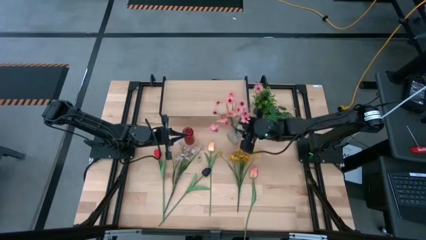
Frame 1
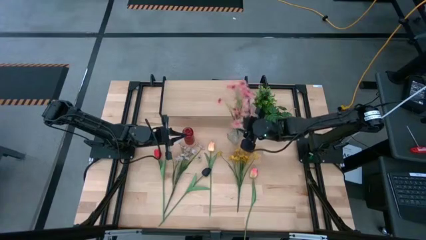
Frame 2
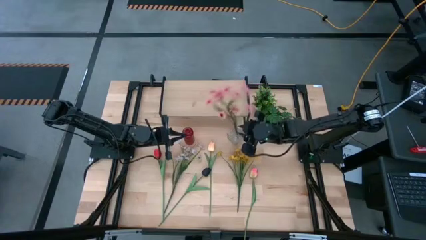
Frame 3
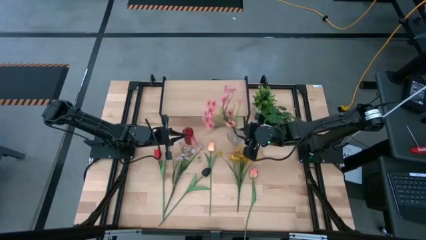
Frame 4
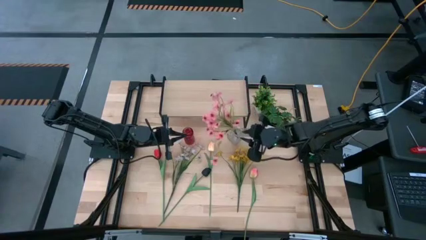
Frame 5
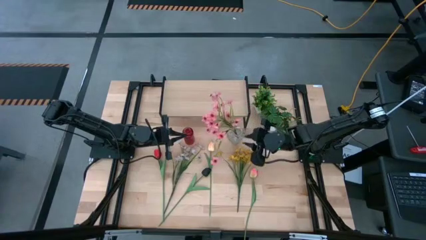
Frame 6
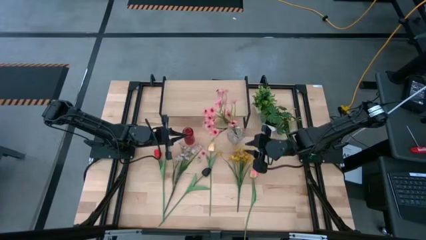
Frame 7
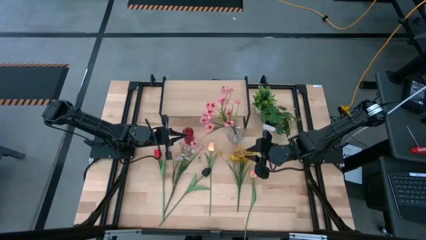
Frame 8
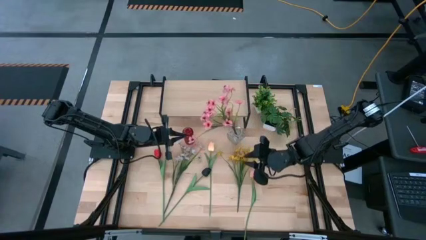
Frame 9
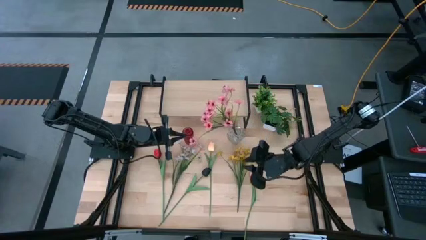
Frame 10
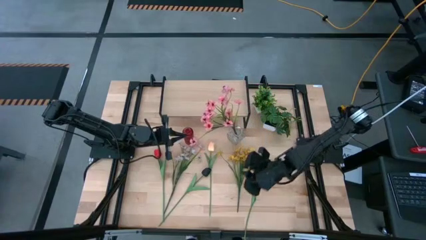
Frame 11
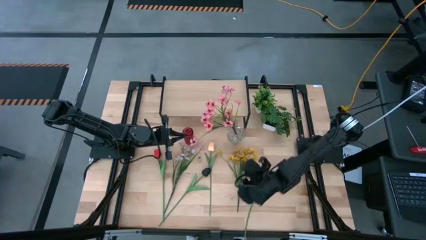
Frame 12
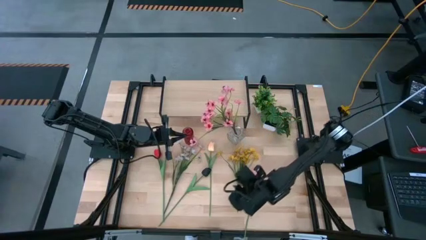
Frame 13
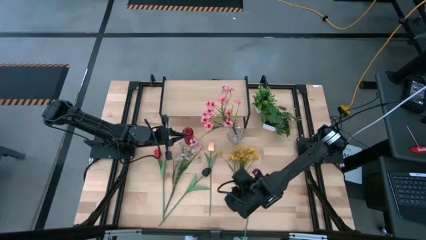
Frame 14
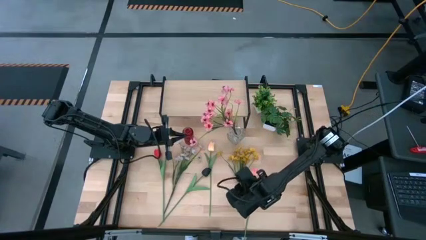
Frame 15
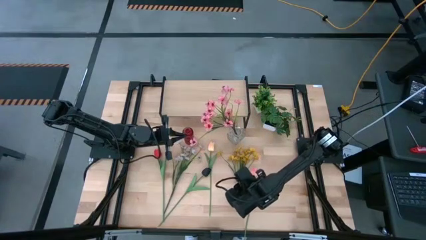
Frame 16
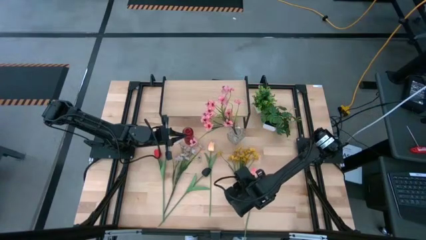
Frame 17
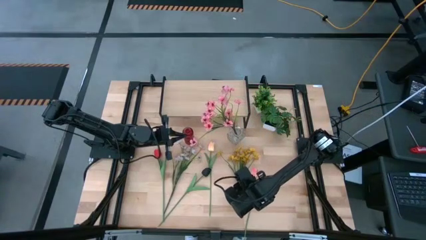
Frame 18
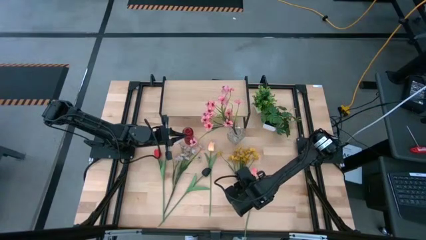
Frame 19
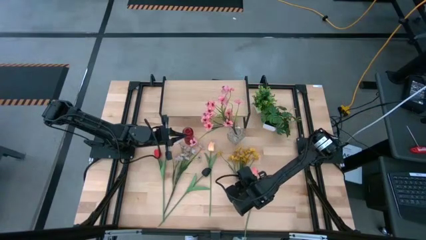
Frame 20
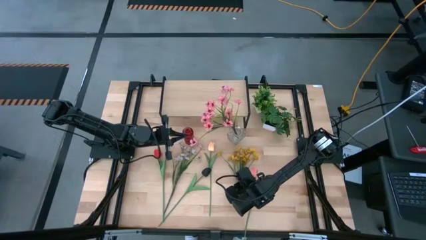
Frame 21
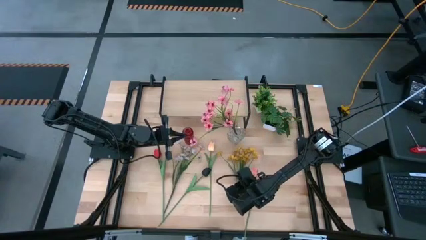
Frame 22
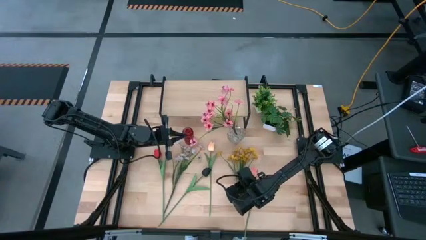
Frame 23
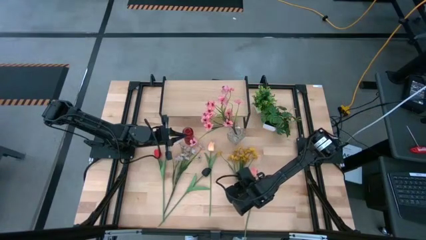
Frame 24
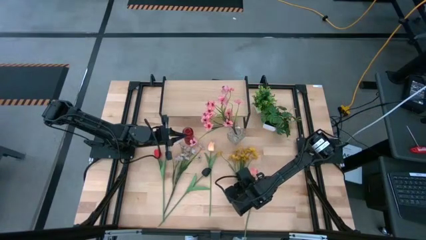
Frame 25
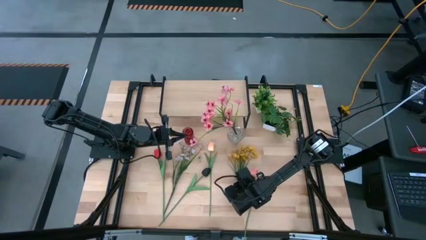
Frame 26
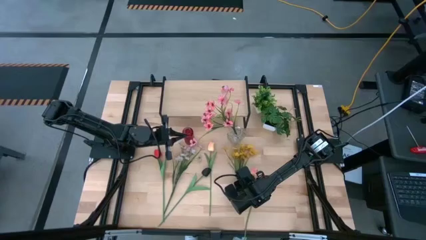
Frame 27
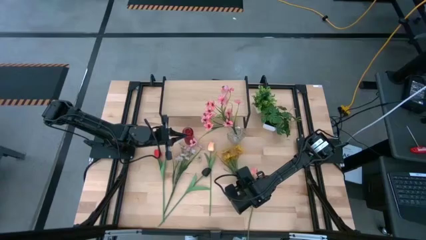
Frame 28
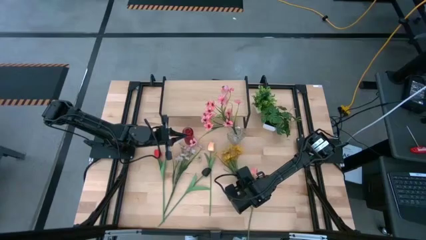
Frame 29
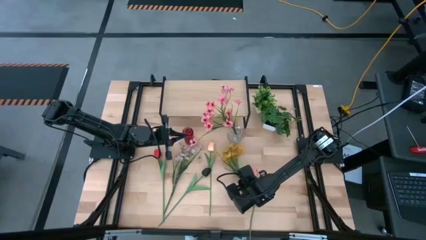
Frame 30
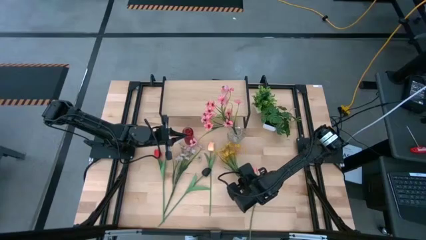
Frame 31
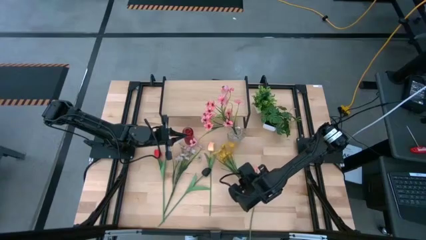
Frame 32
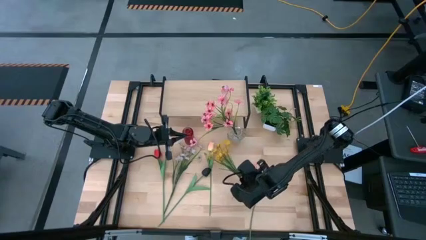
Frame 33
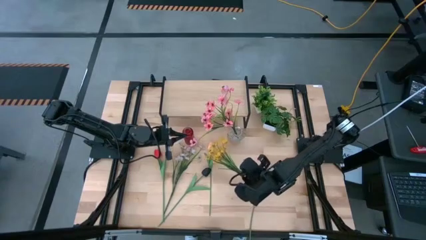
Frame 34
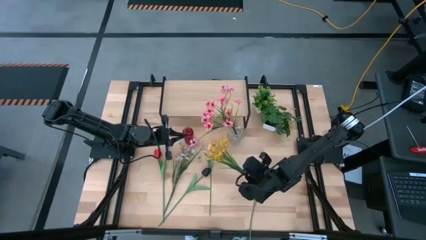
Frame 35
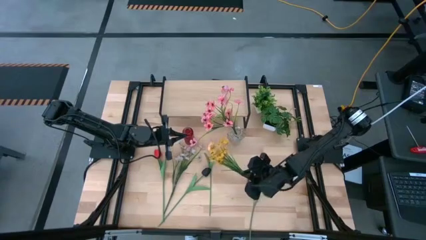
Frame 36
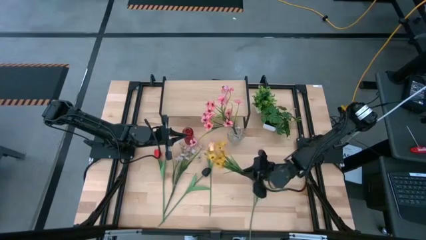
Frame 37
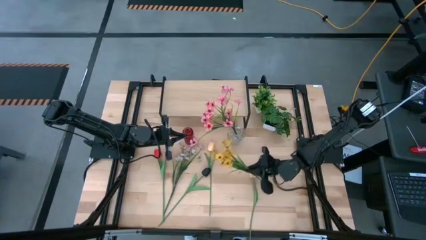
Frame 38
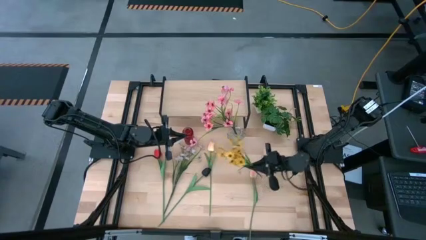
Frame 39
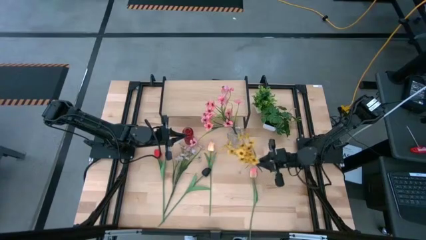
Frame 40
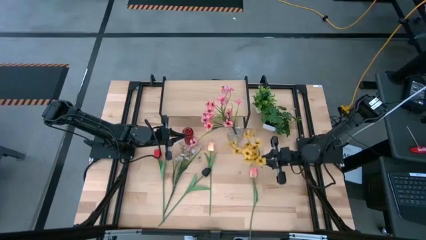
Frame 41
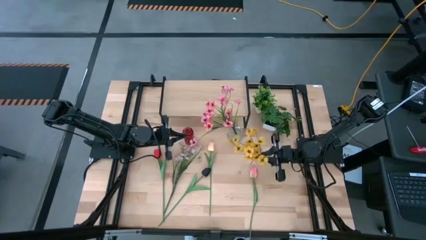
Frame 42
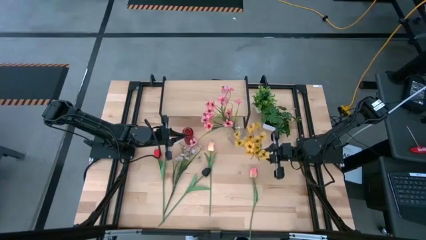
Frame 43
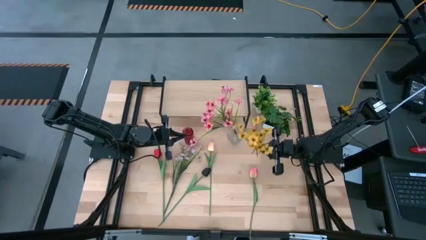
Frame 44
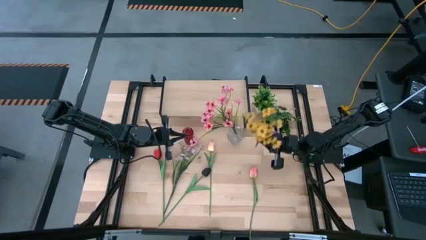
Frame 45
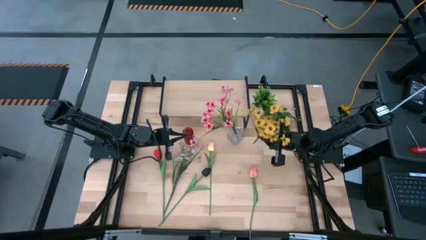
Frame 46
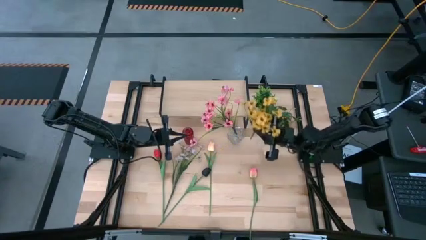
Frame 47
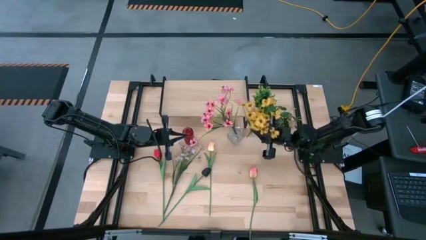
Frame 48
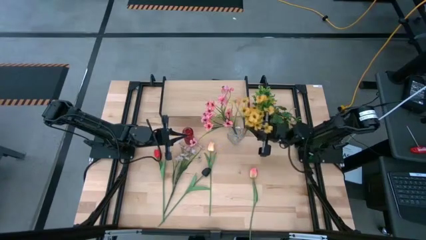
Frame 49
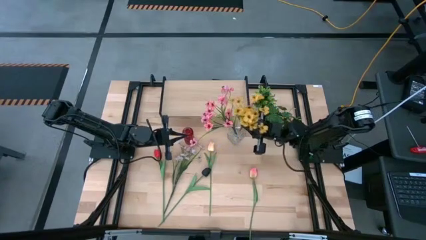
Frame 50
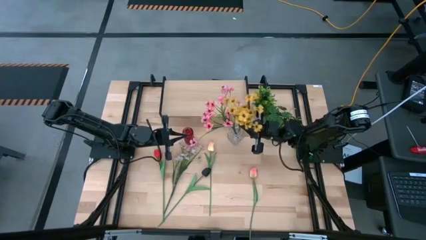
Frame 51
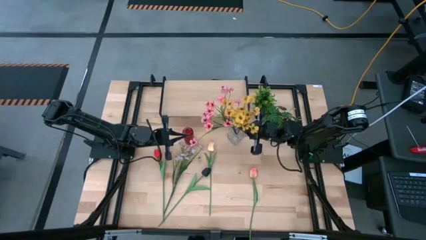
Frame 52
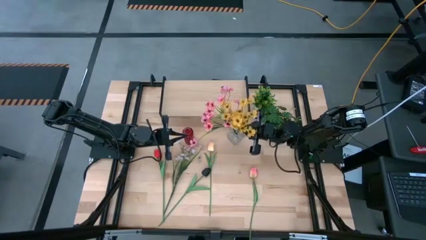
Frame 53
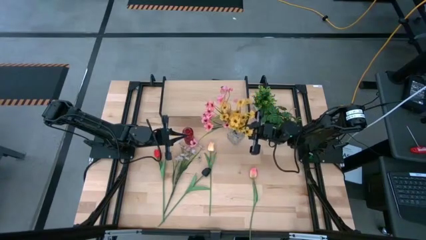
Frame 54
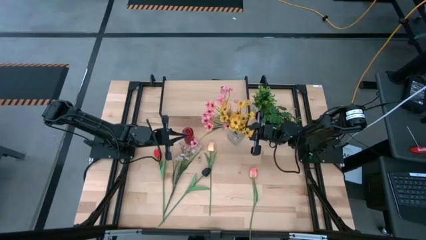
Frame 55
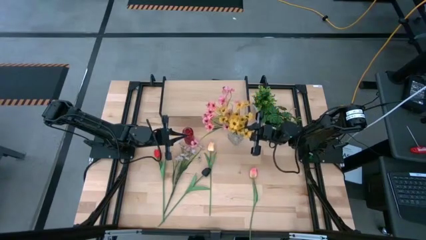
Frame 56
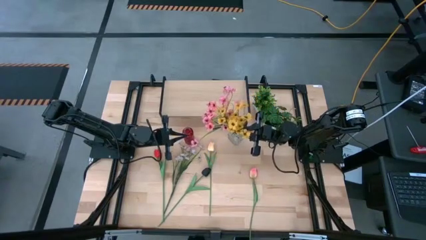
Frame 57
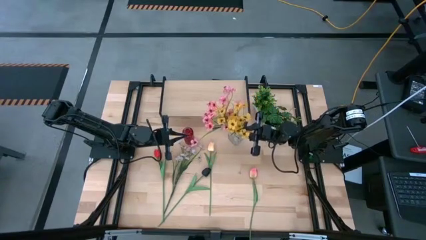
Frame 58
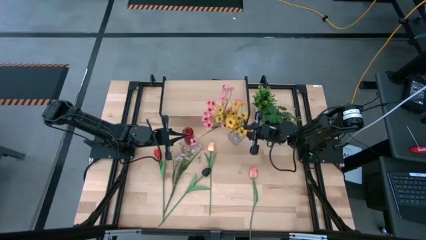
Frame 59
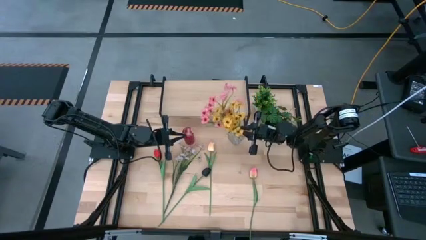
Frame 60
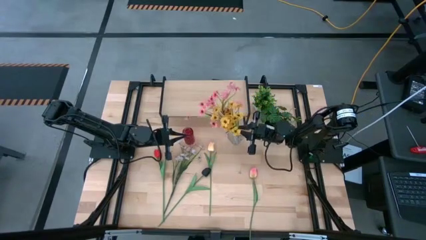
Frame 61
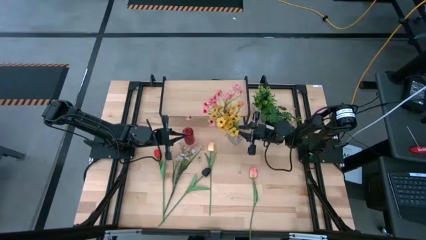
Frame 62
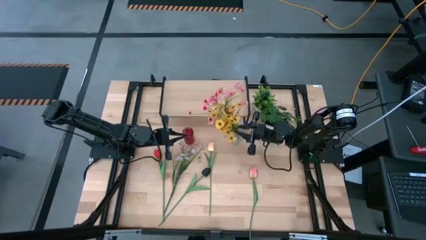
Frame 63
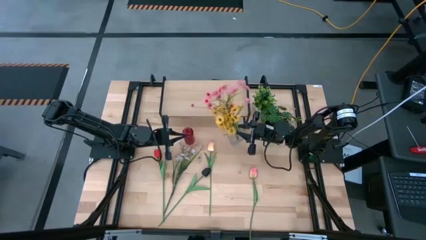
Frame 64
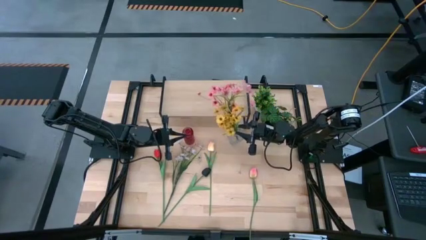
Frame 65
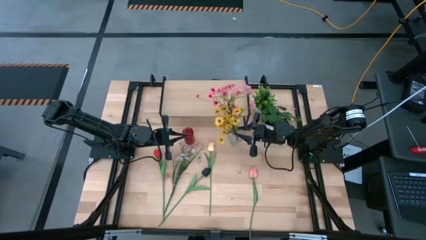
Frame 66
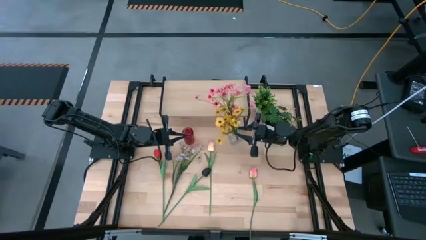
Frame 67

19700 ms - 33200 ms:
Task: Pick and place flowers into a vace then onto a shelf
Put the yellow flowers into the transparent flower vase

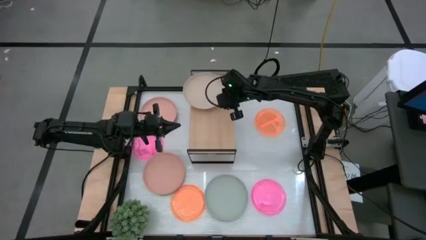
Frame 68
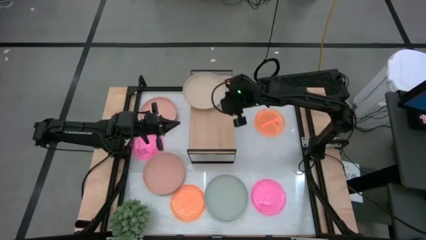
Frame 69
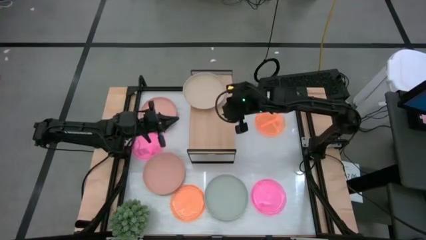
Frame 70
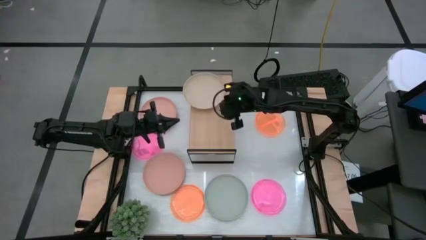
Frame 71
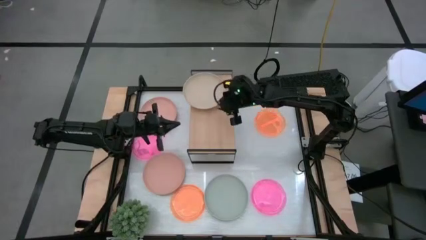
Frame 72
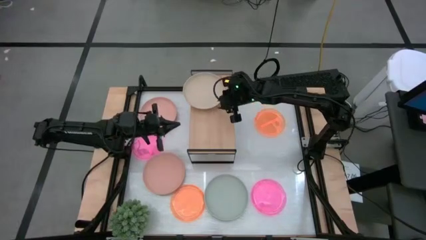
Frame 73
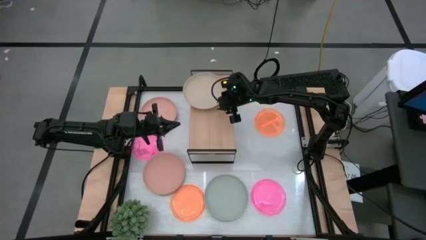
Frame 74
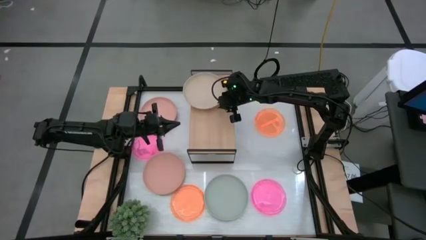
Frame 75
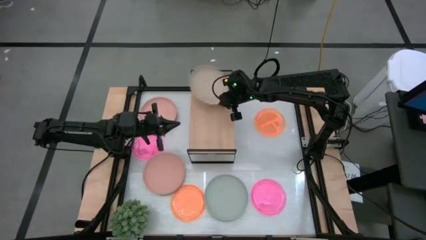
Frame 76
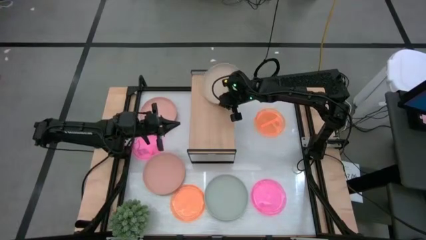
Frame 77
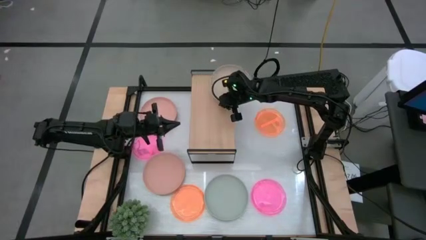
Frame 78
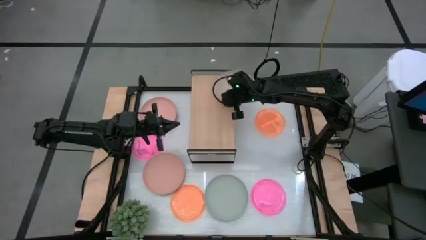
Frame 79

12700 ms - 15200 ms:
Task: Place and stack plates onto a shelf
Put the brown plate on the shelf
